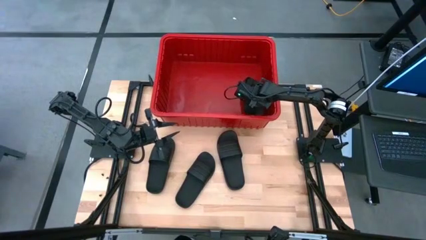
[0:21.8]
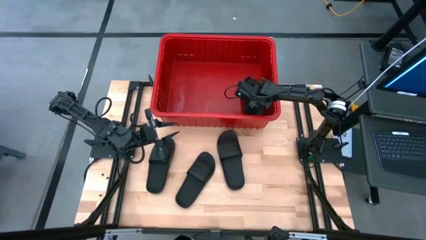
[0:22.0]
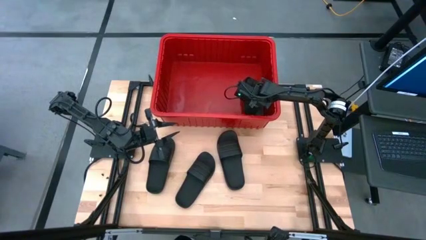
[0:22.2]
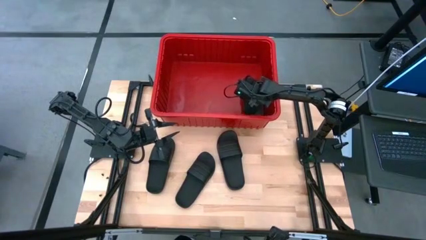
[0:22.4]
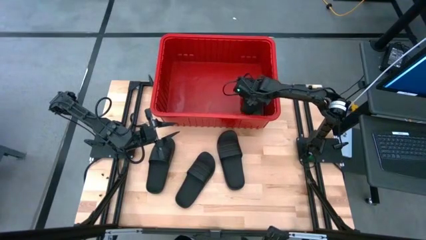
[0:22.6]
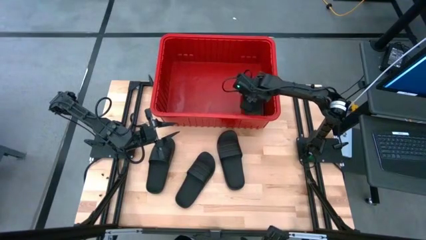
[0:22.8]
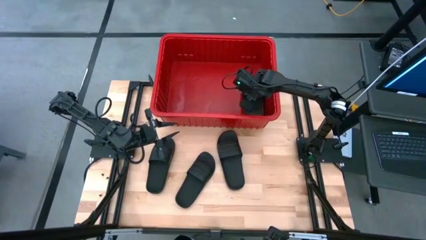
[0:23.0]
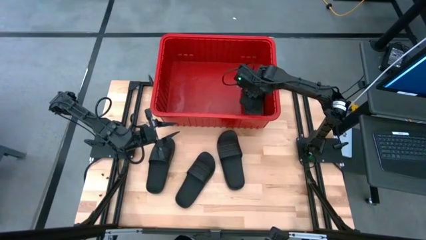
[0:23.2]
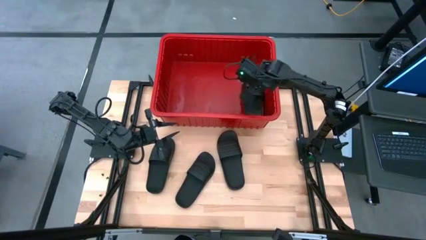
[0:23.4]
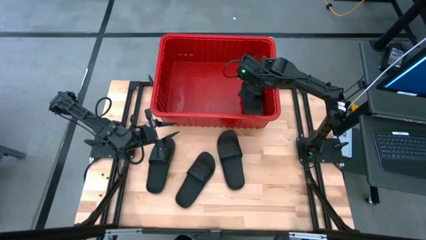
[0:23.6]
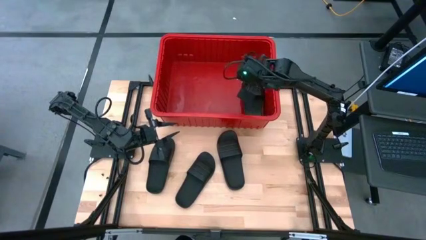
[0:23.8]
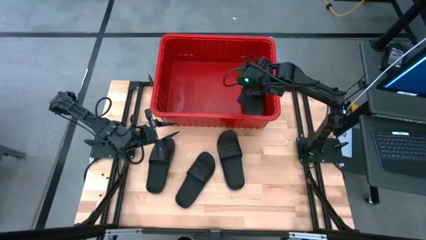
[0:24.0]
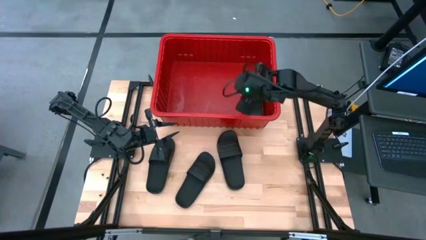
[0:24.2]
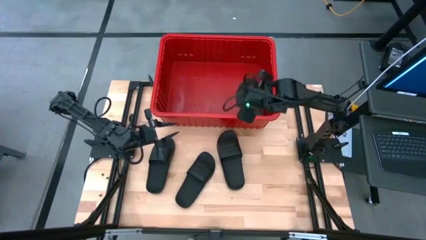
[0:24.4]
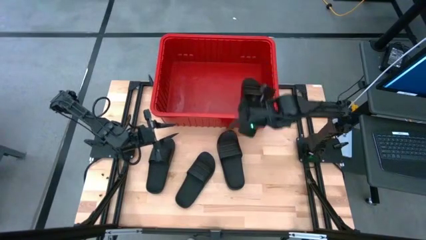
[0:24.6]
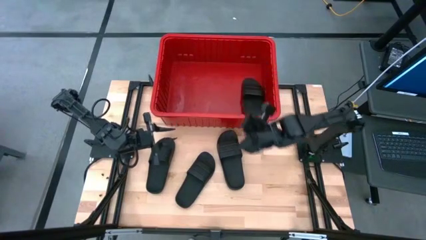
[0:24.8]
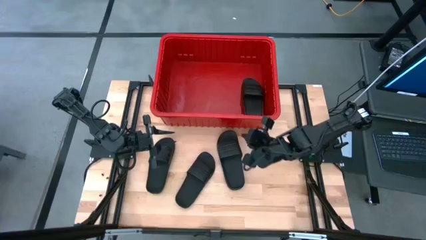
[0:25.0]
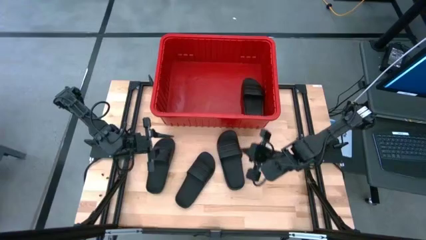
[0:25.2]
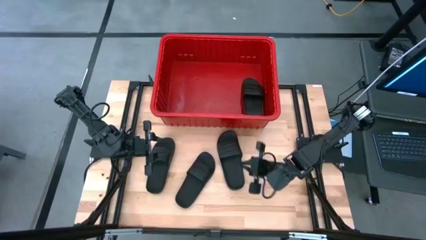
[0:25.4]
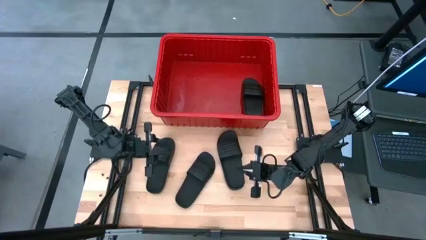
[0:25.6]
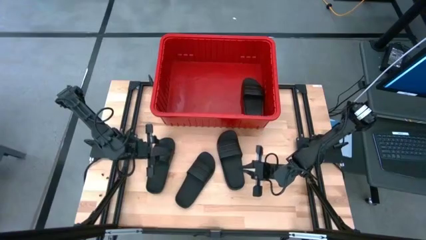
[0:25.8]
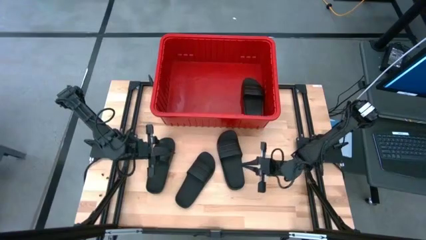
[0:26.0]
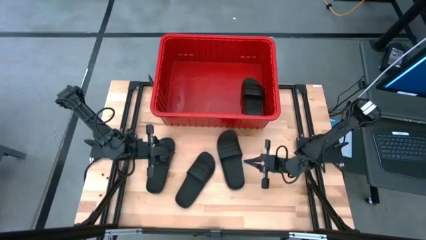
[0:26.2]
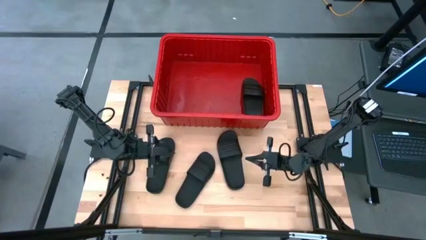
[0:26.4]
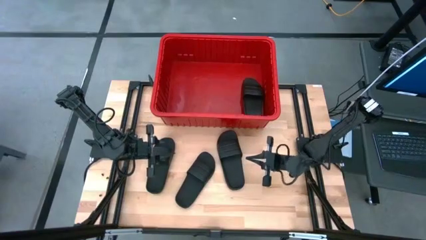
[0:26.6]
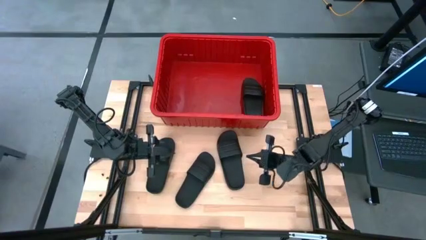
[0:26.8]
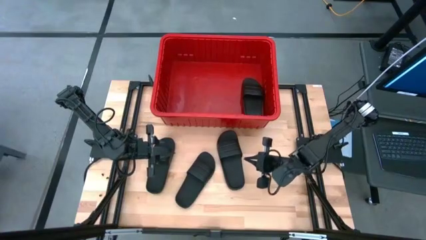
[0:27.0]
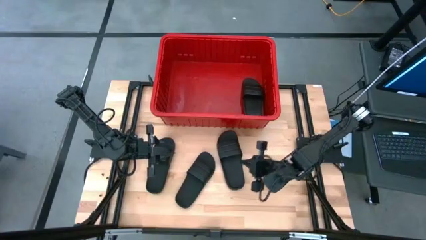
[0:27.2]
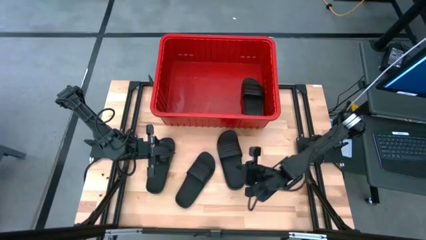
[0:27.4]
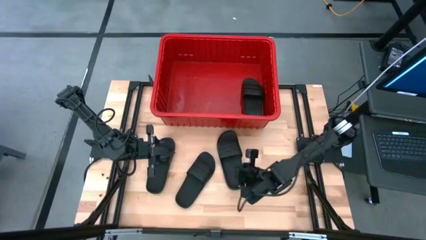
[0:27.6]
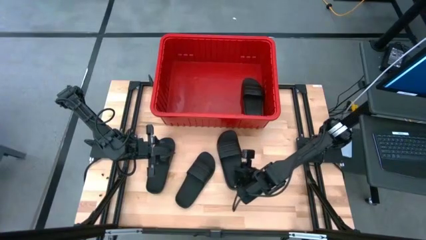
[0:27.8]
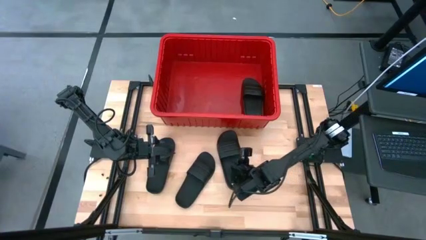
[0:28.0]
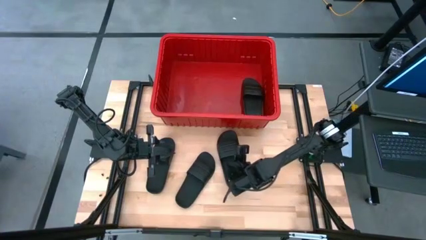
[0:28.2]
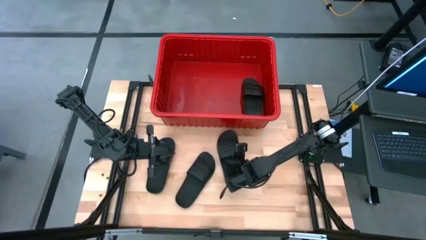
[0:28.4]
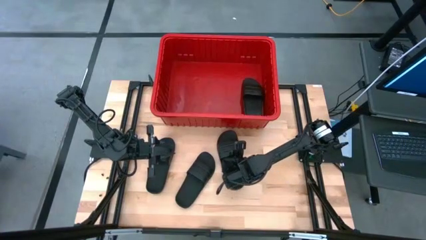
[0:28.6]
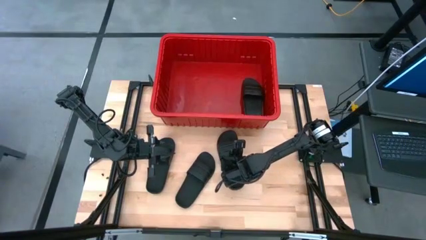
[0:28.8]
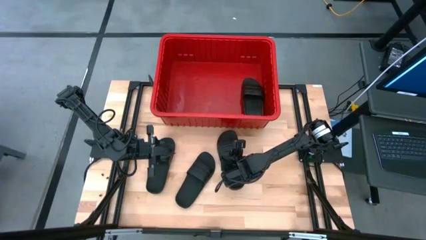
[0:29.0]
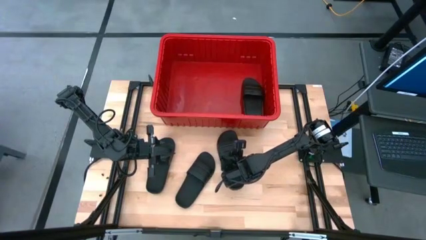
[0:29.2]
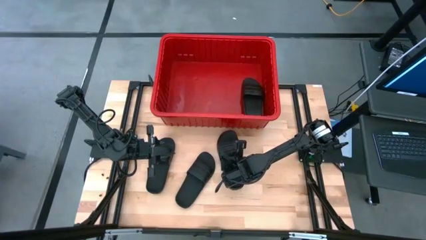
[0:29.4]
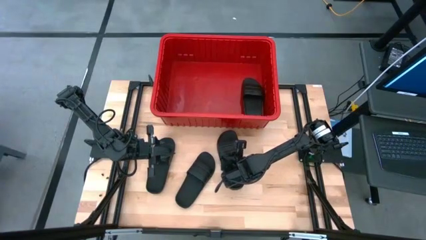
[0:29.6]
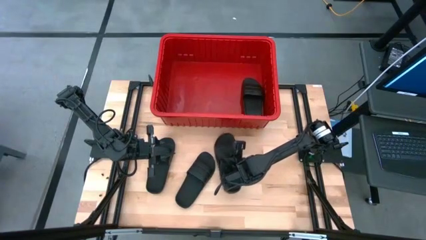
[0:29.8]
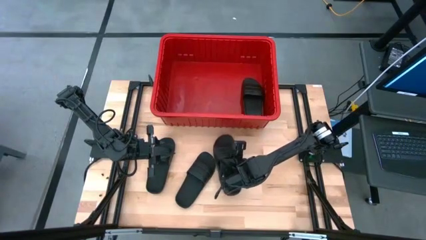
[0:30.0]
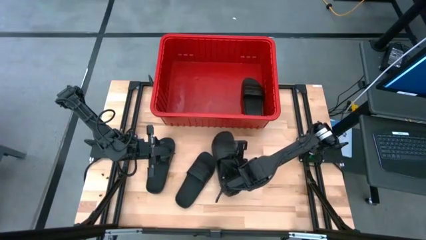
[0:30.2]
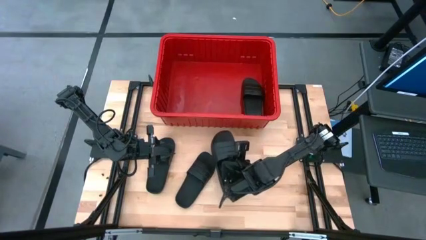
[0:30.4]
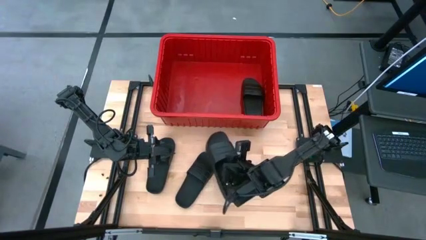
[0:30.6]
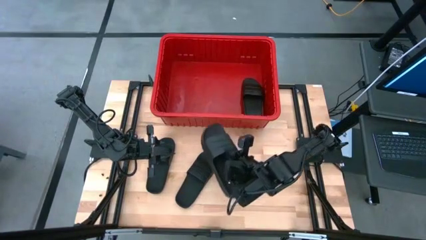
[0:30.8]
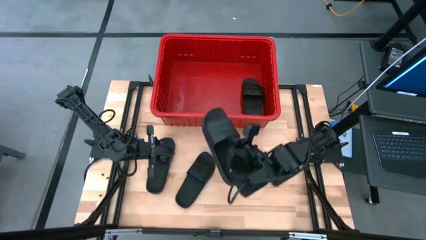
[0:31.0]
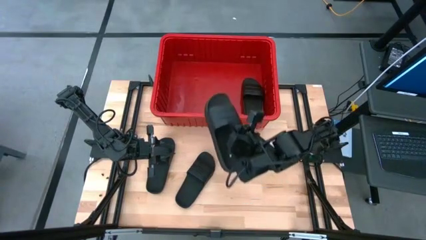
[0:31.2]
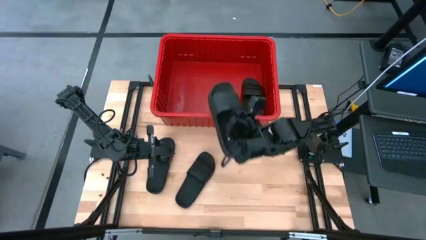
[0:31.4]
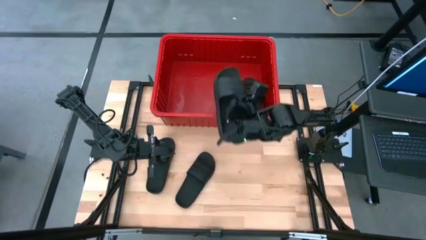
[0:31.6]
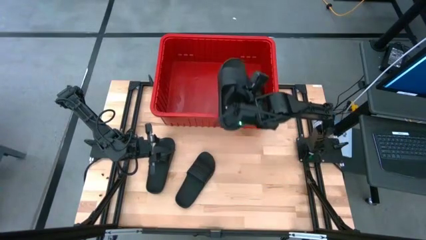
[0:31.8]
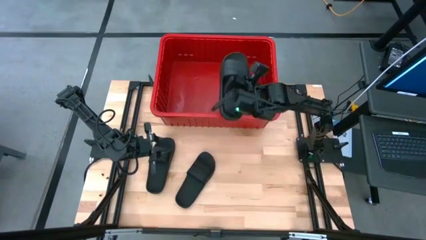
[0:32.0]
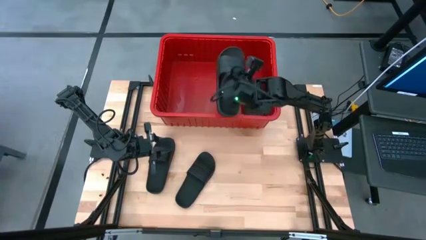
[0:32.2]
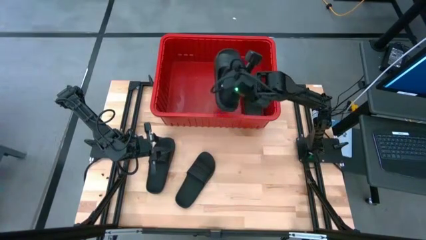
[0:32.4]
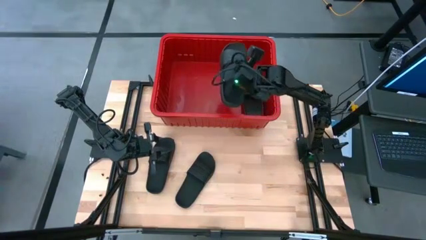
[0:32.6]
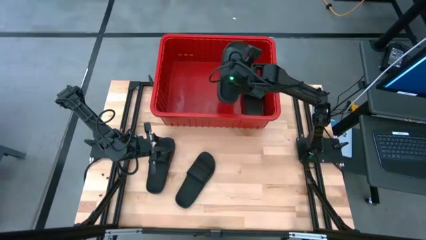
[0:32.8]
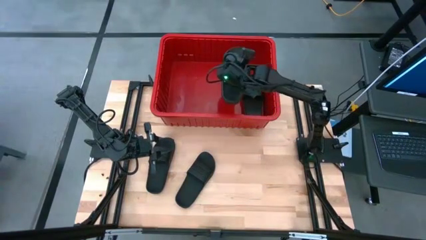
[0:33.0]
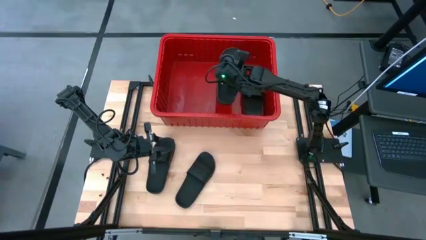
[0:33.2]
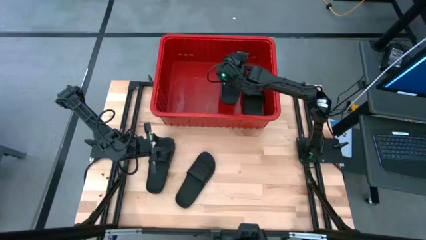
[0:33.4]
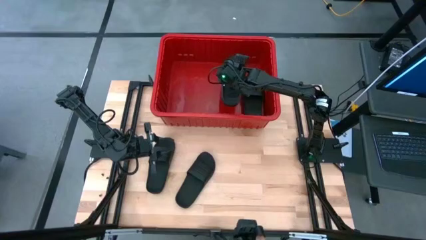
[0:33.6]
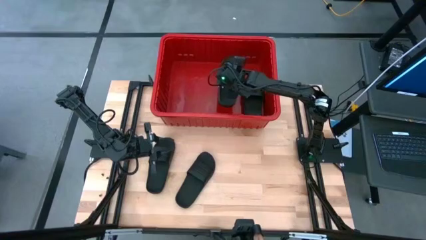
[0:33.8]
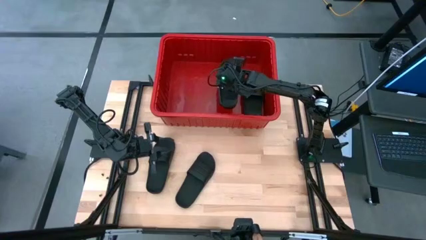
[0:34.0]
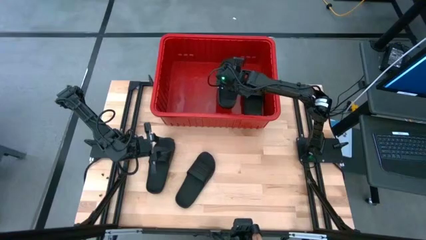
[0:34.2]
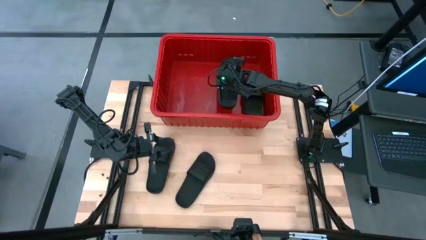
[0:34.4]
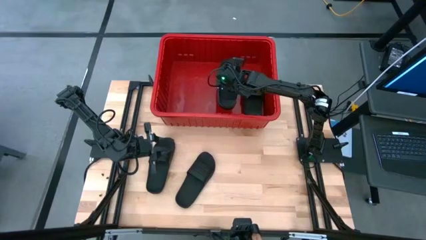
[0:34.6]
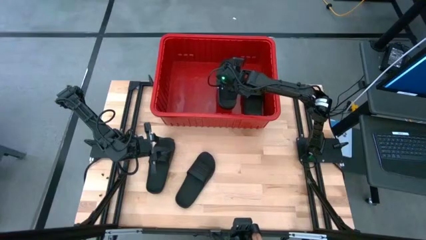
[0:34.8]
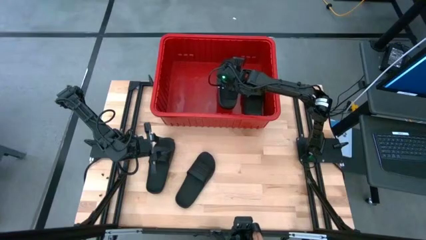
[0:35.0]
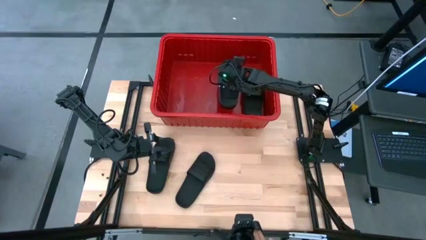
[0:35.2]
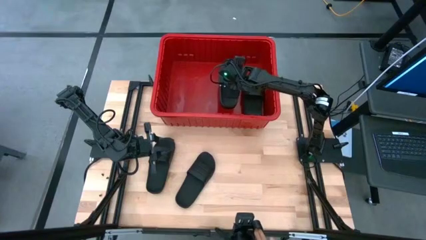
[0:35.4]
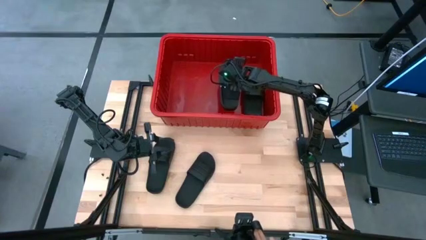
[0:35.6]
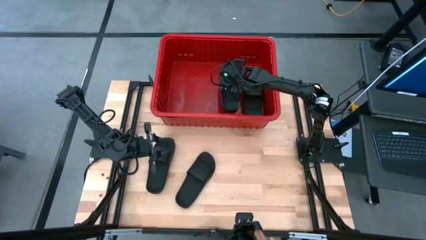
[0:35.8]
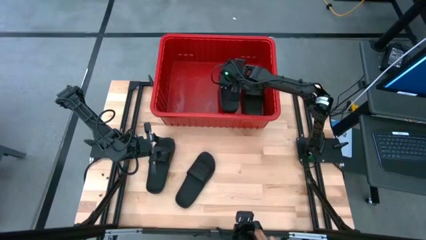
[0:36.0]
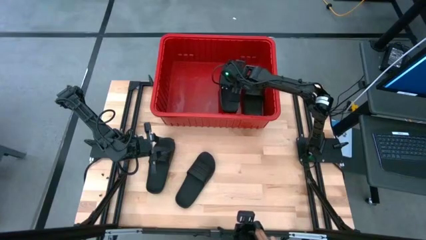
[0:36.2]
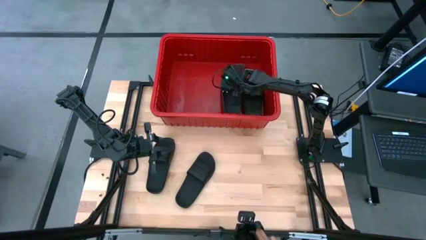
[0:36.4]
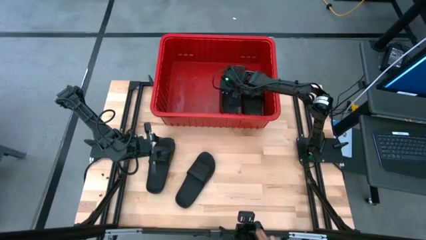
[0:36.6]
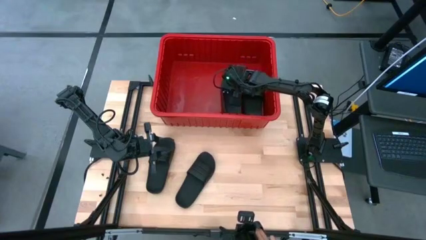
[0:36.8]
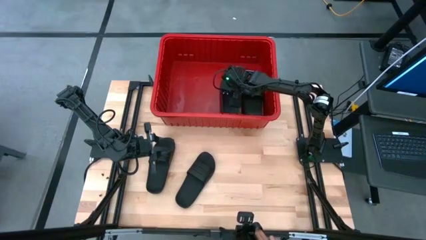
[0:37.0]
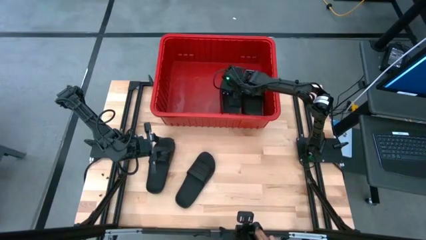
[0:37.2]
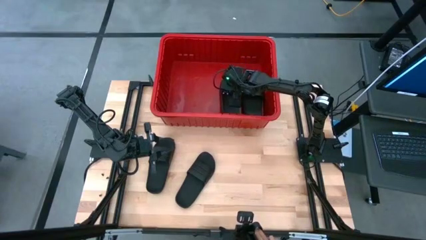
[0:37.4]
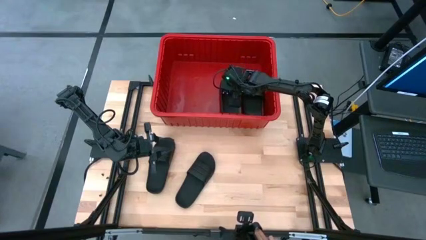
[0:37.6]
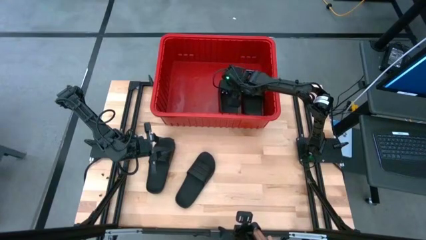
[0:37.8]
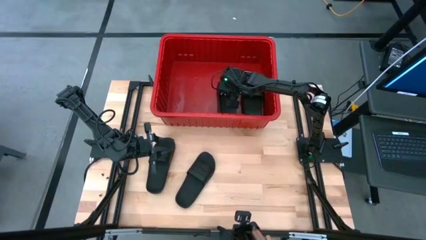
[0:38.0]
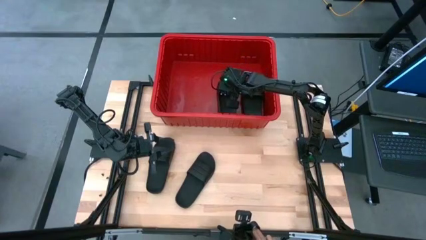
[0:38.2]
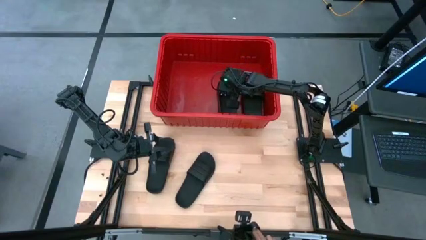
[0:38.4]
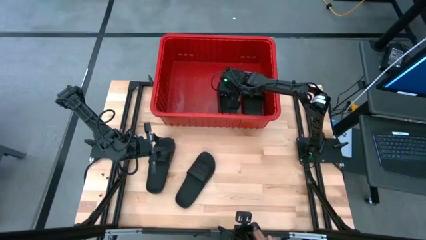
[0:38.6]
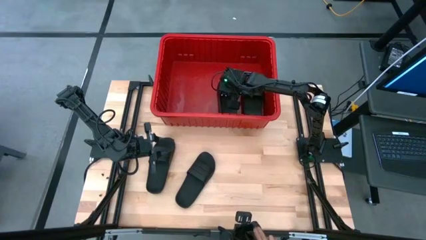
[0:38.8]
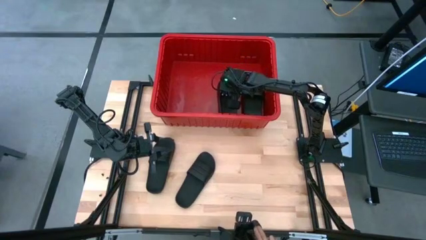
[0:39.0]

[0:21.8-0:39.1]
Task: Pick and place slides into bin
Put the right black slide into the red bin
